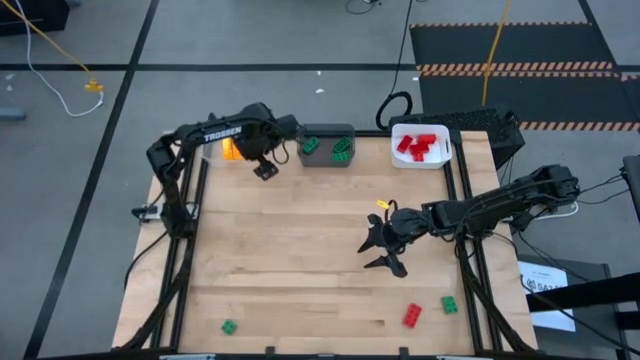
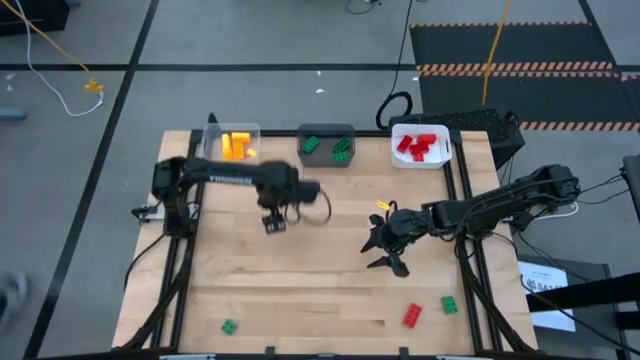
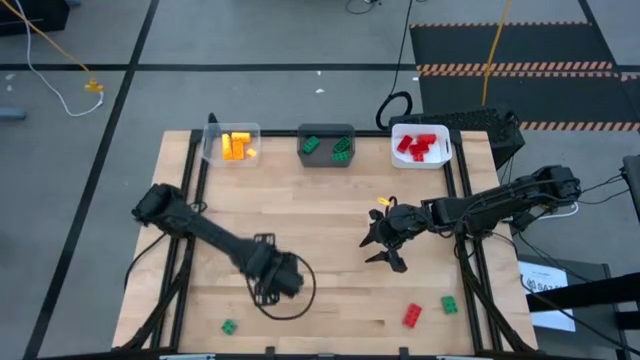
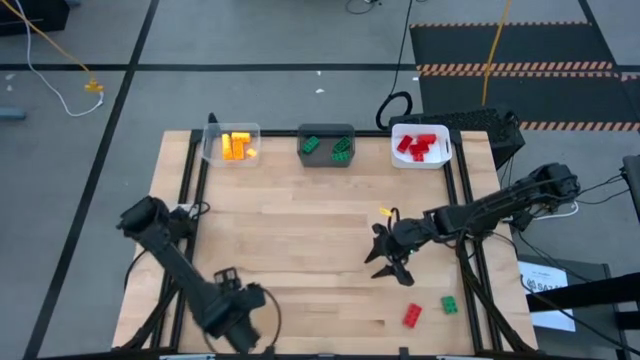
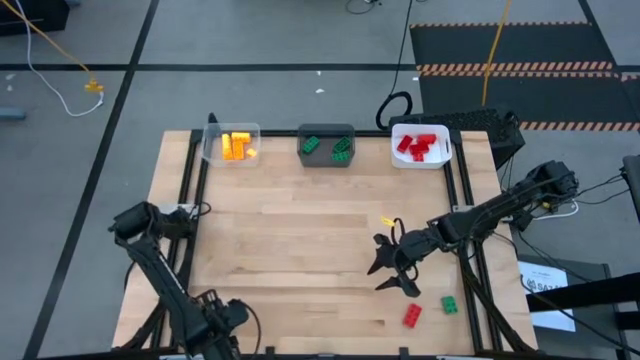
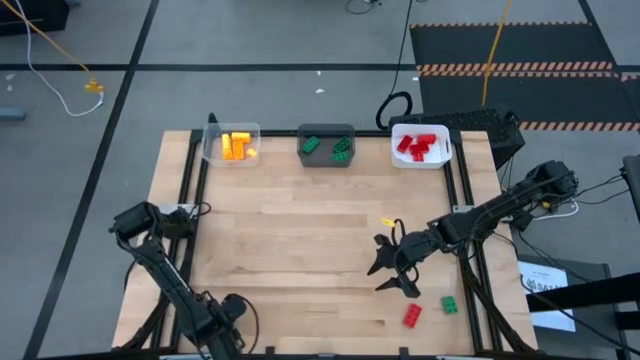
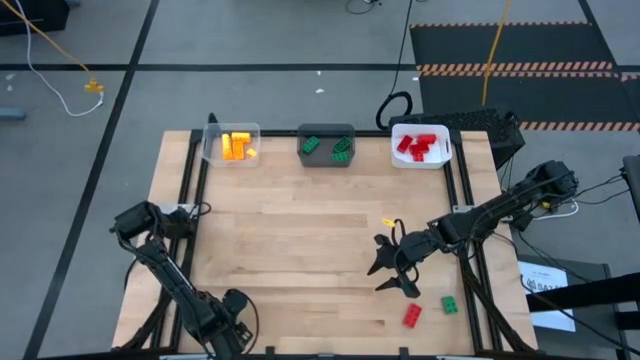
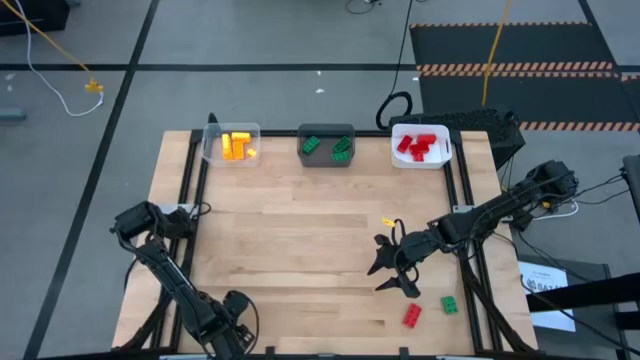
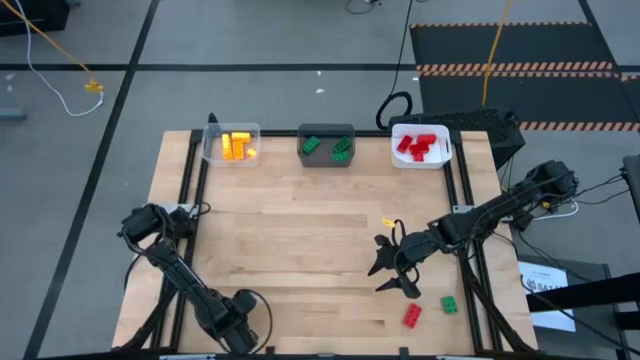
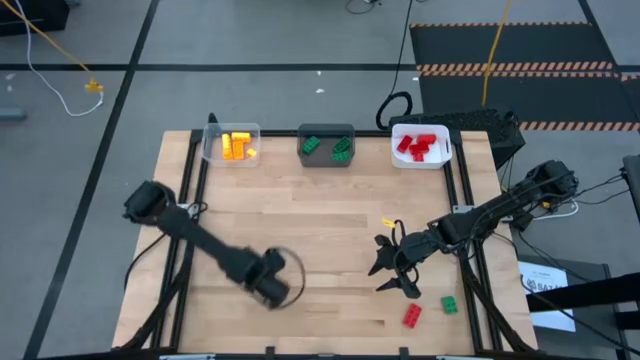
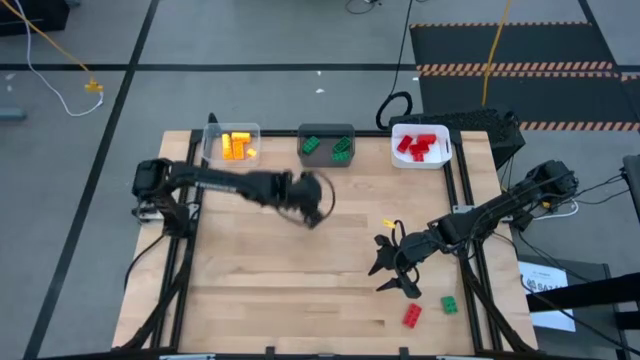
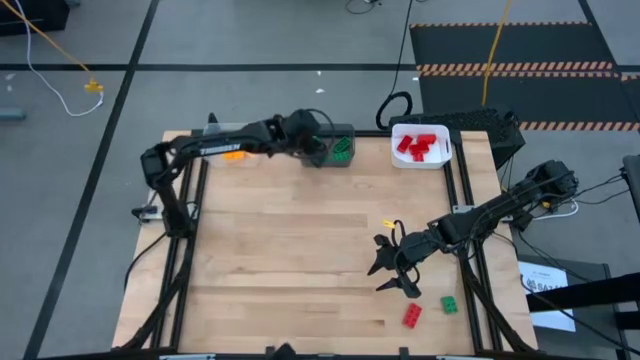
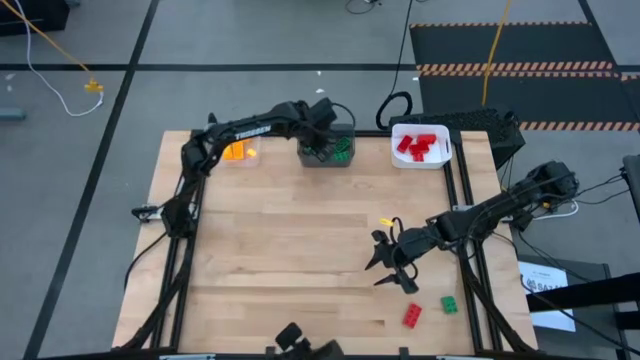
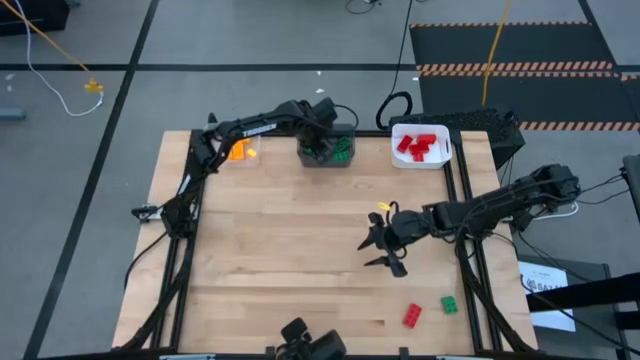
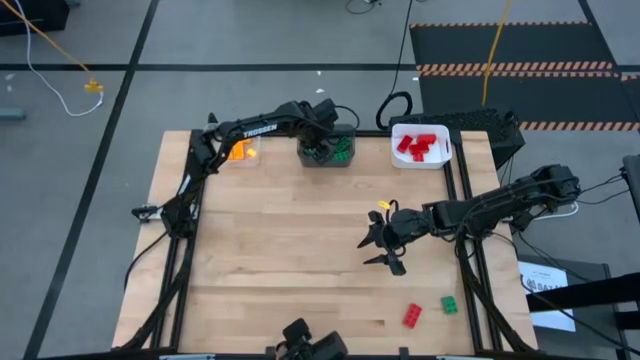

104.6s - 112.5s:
Task: Sort & place blocks by color
Put the 4 stud green game piece into the gray bin

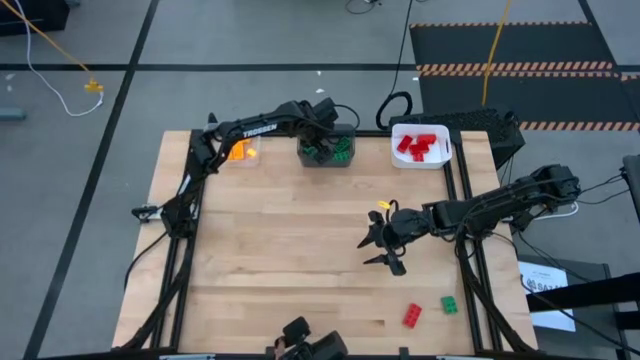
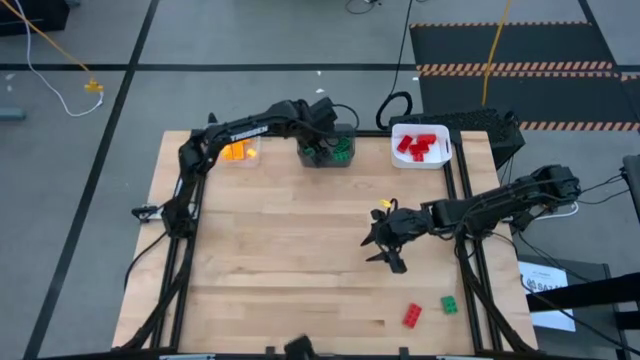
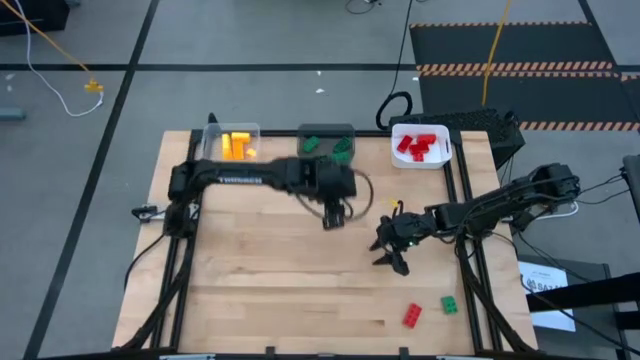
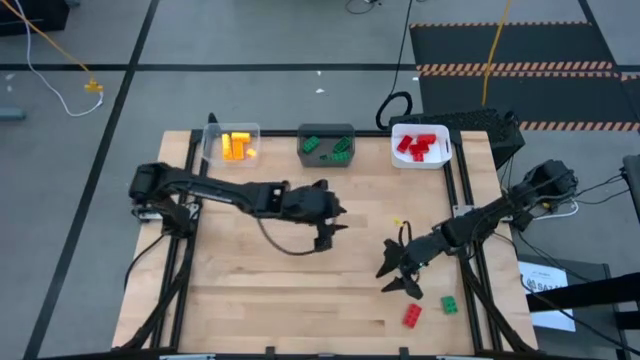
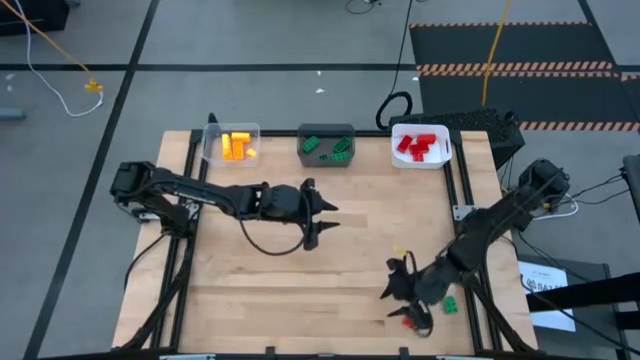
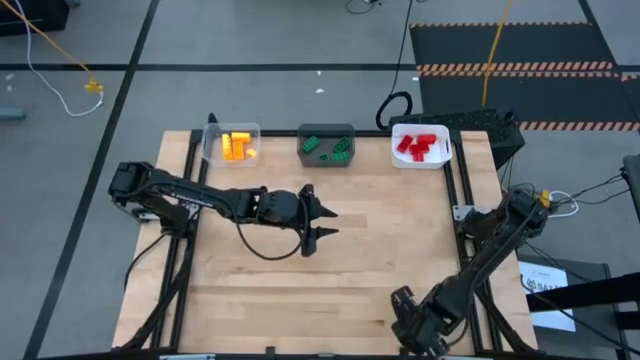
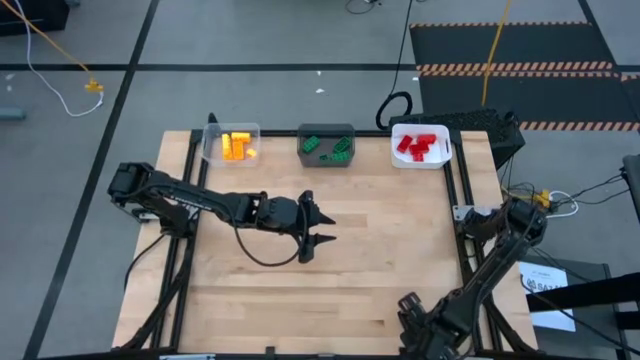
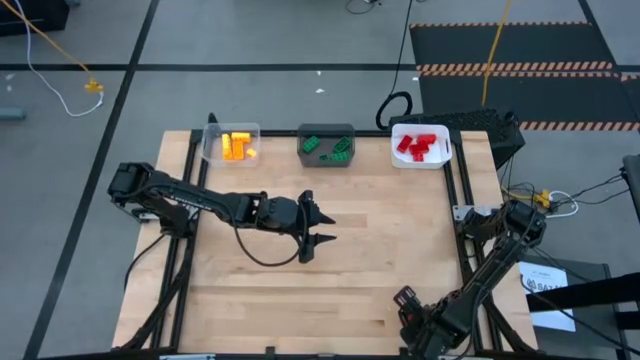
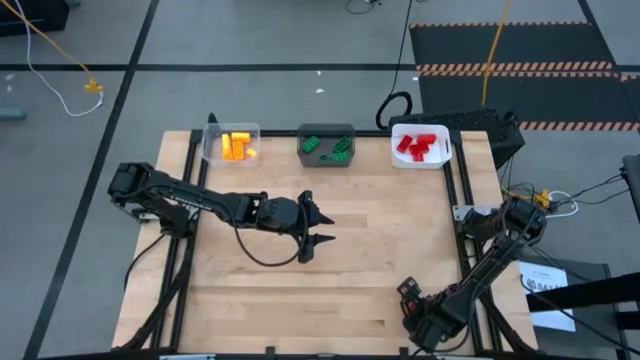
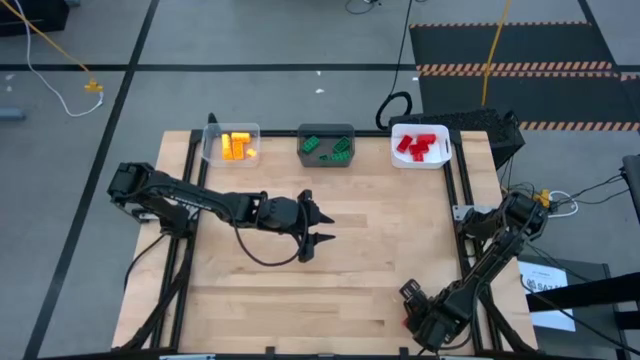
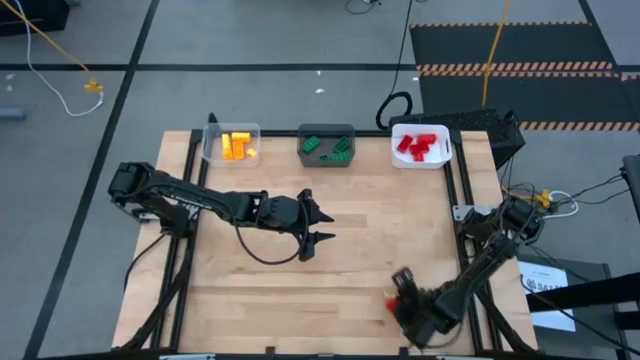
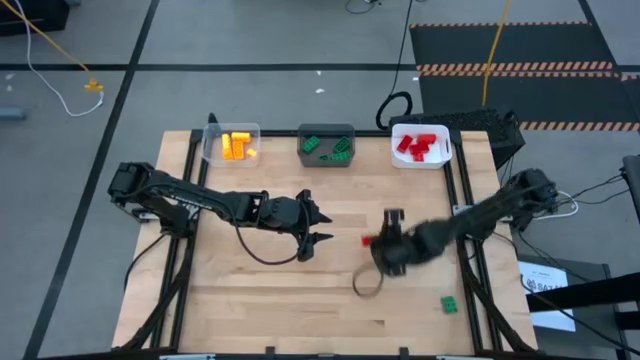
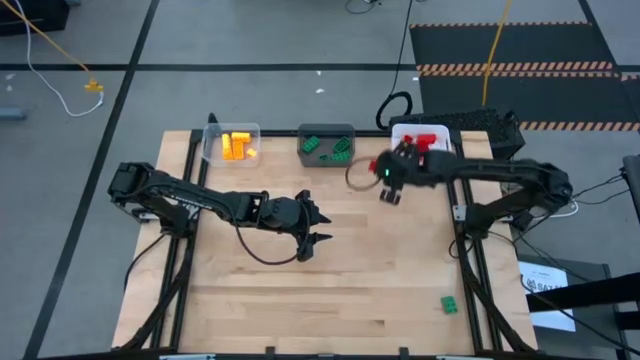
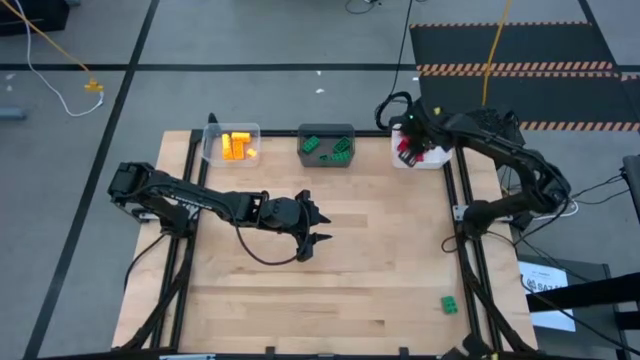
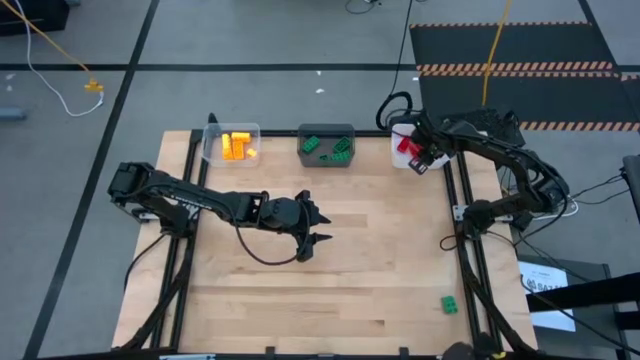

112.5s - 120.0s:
Put the 8 stud red game piece into the white bin

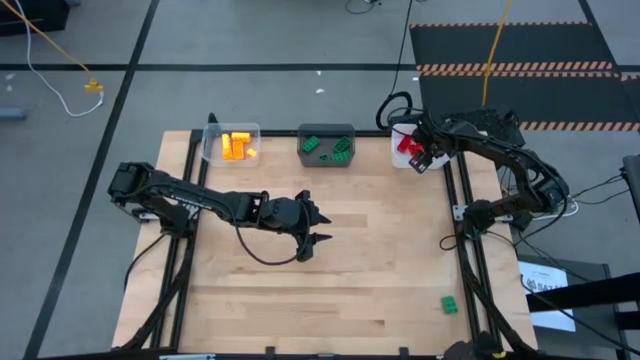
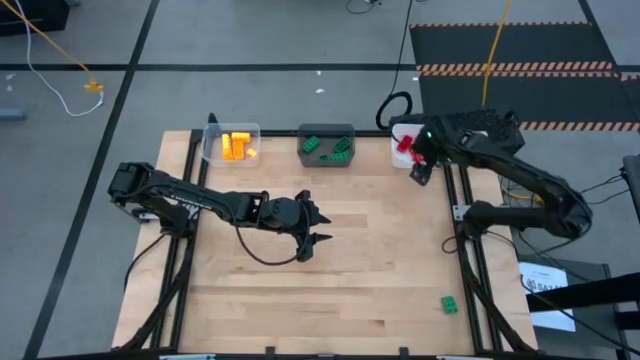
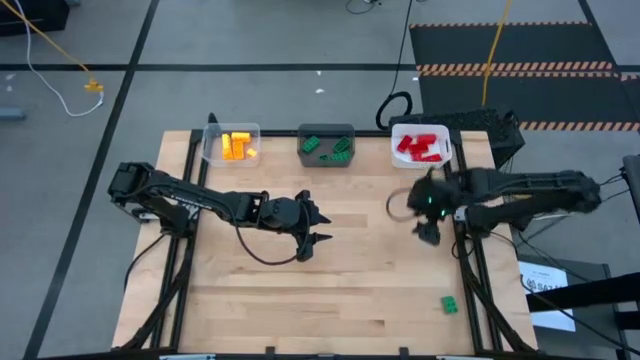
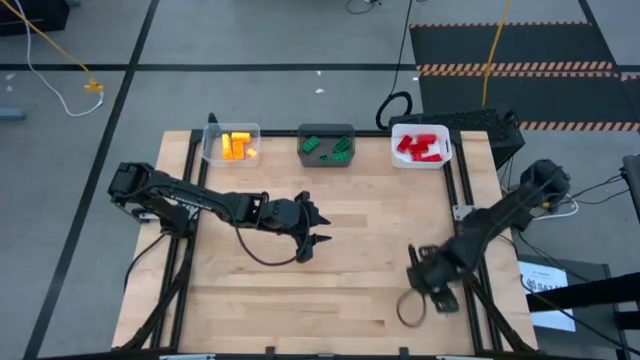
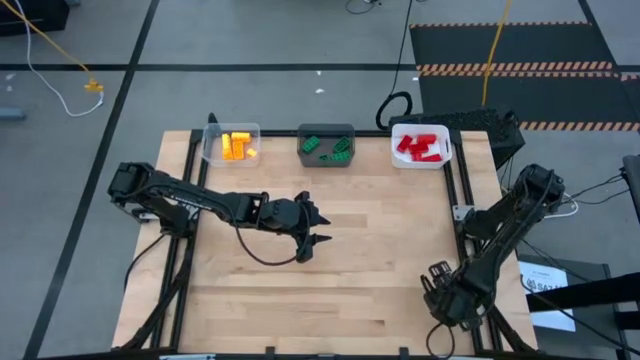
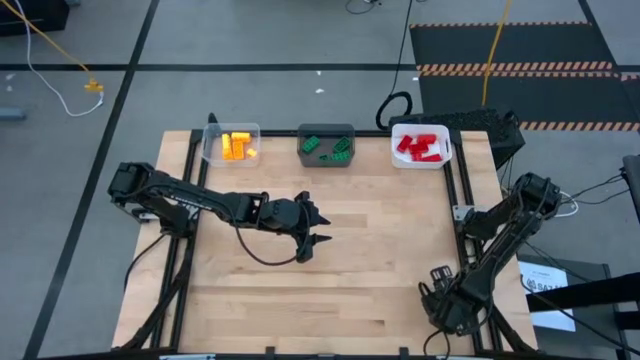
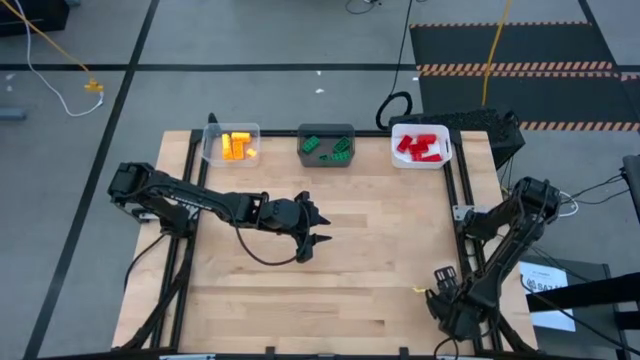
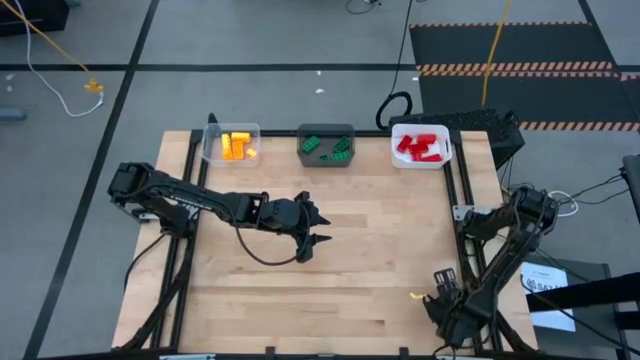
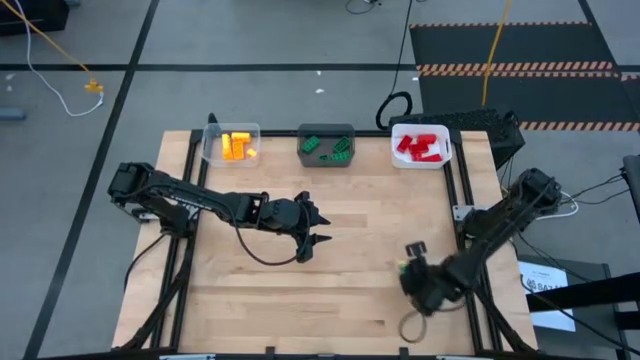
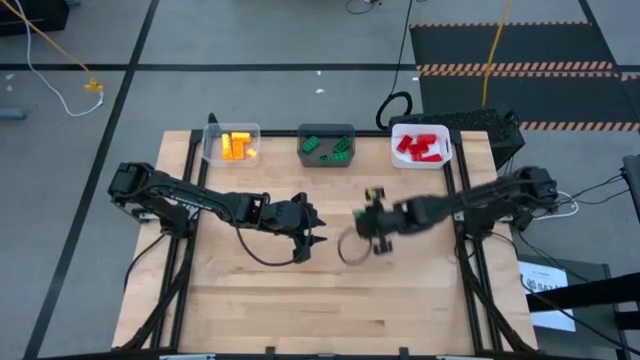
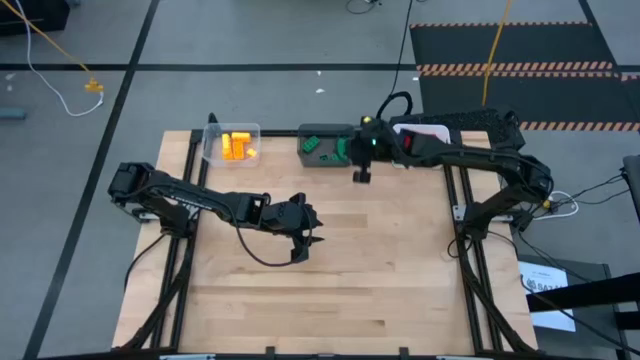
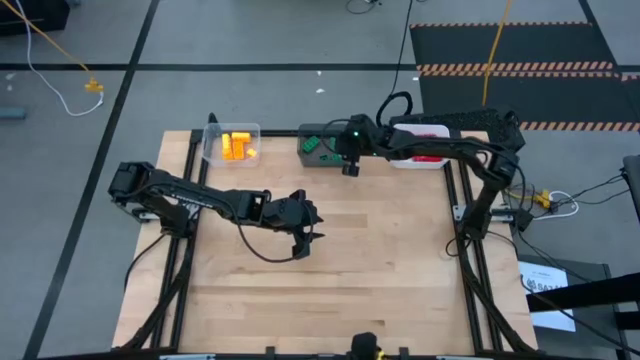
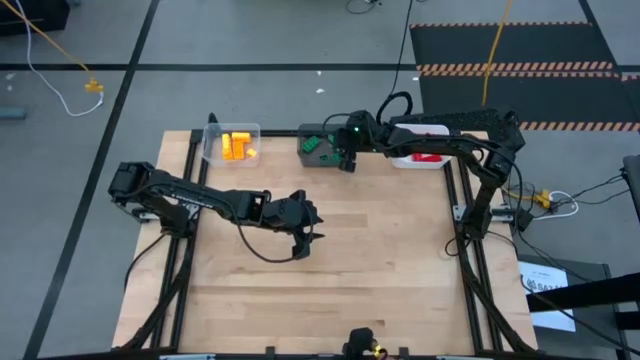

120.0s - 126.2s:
Put the 4 stud green game piece into the gray bin
